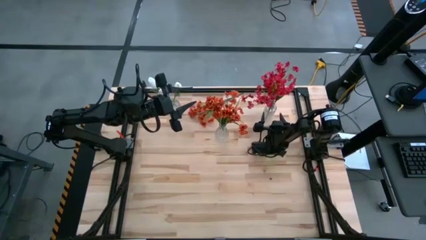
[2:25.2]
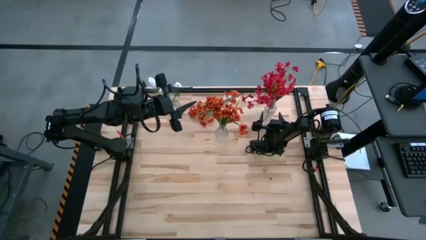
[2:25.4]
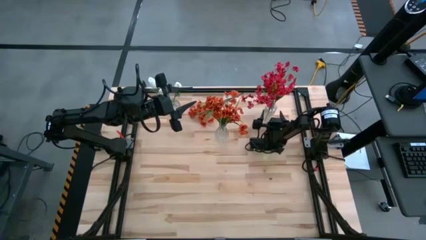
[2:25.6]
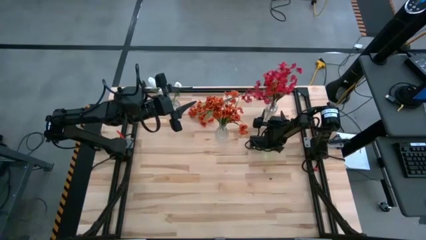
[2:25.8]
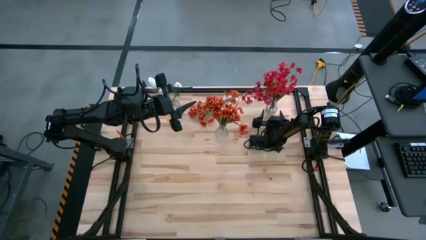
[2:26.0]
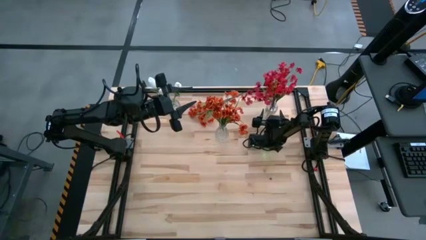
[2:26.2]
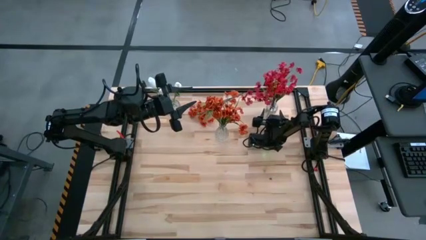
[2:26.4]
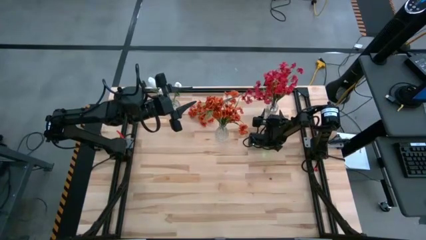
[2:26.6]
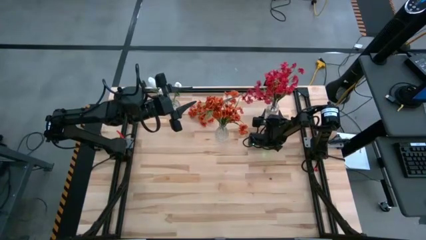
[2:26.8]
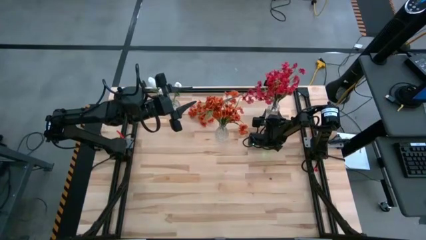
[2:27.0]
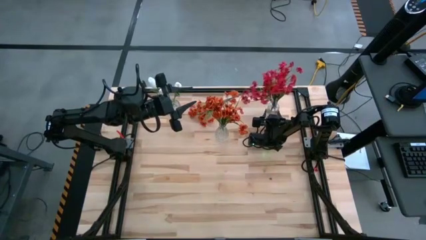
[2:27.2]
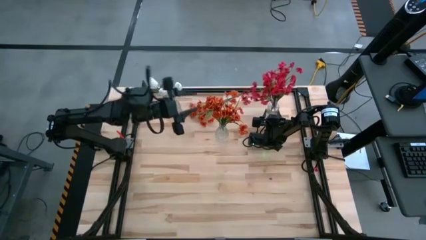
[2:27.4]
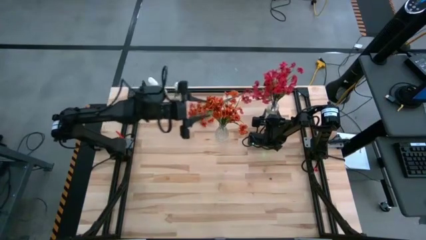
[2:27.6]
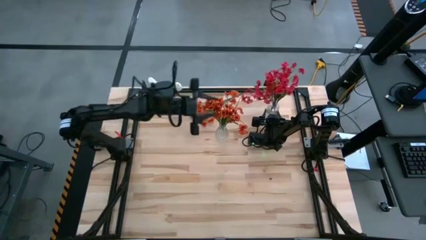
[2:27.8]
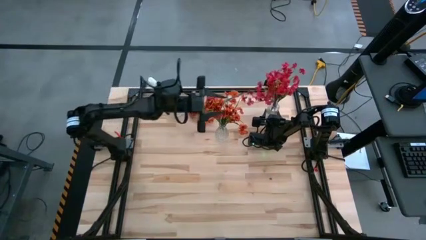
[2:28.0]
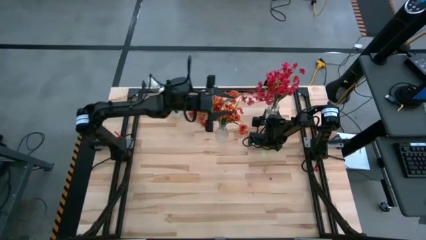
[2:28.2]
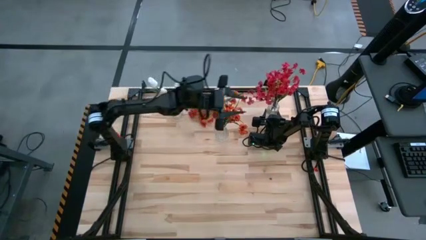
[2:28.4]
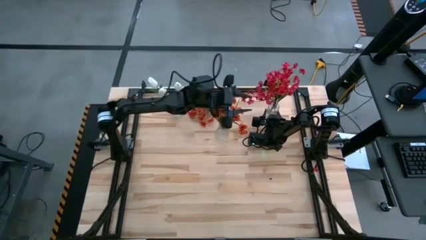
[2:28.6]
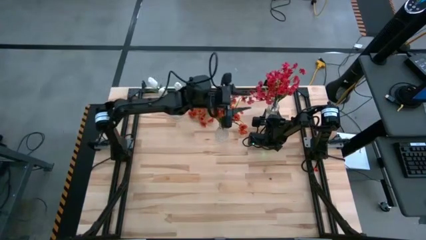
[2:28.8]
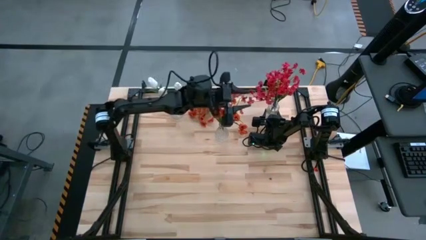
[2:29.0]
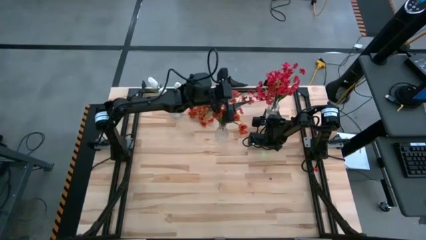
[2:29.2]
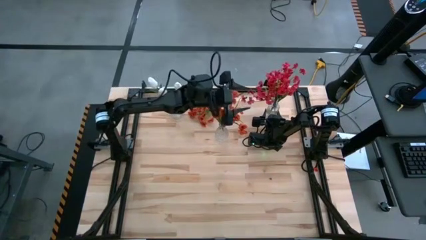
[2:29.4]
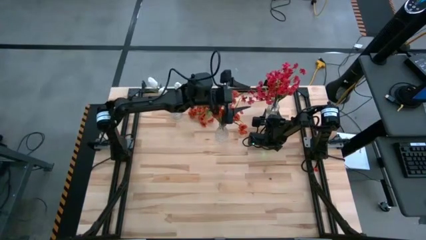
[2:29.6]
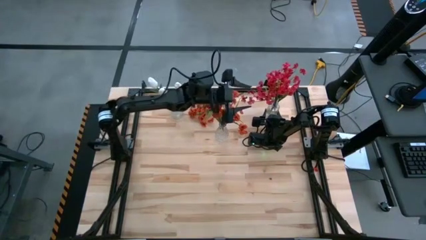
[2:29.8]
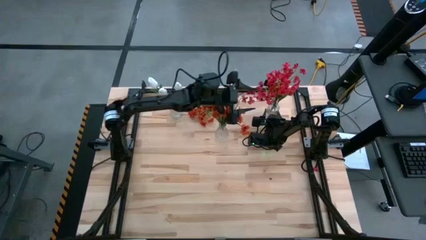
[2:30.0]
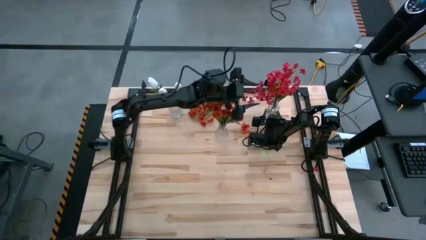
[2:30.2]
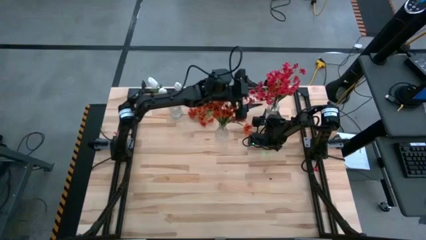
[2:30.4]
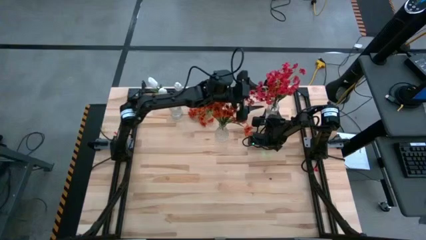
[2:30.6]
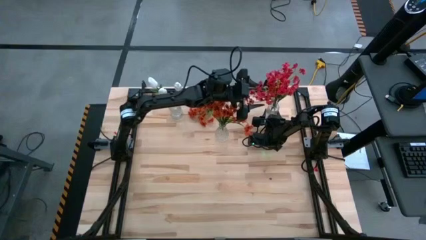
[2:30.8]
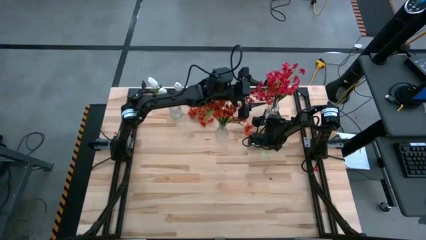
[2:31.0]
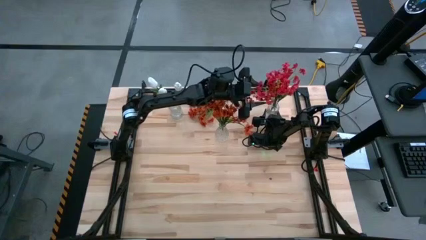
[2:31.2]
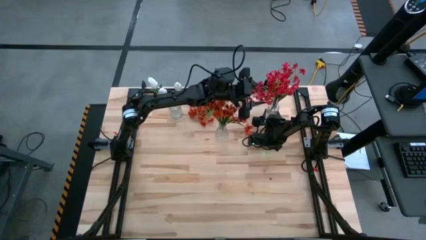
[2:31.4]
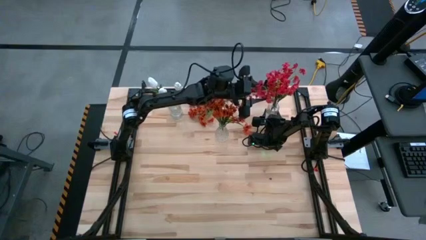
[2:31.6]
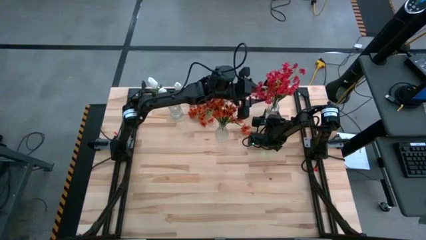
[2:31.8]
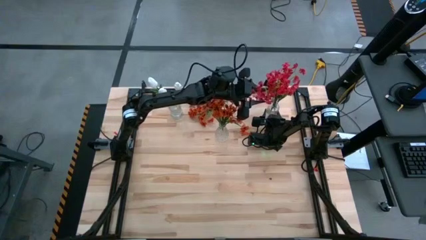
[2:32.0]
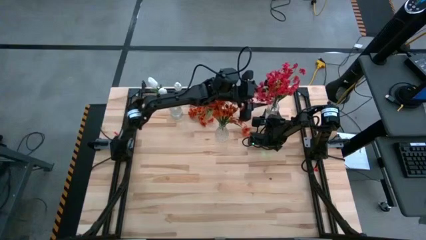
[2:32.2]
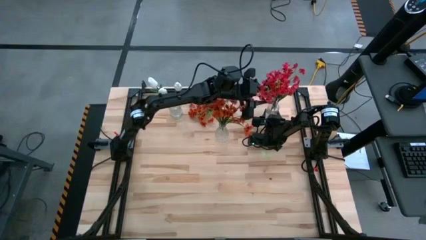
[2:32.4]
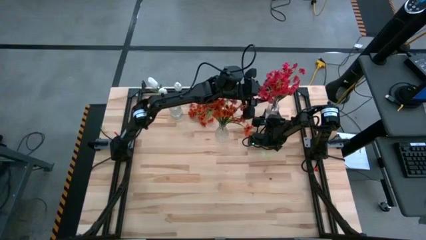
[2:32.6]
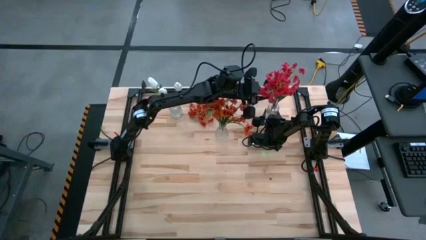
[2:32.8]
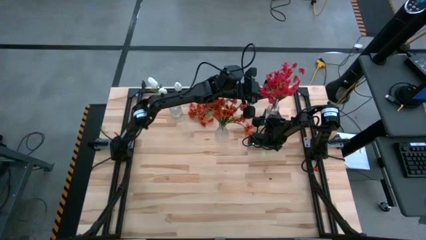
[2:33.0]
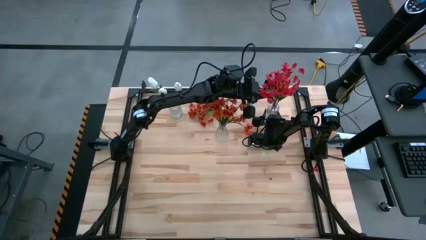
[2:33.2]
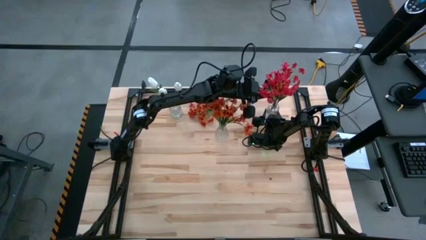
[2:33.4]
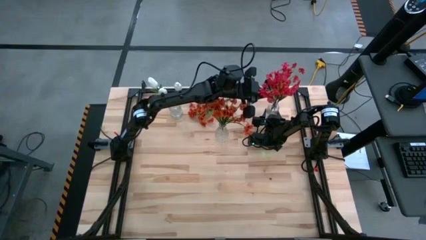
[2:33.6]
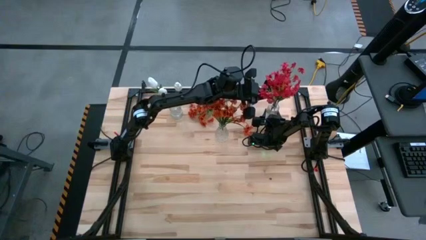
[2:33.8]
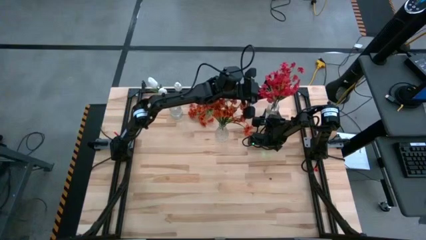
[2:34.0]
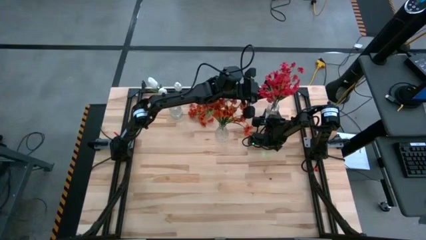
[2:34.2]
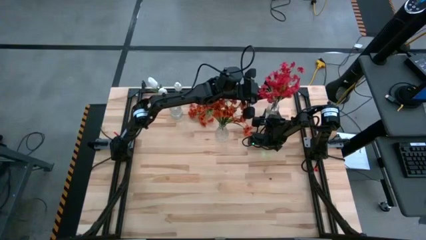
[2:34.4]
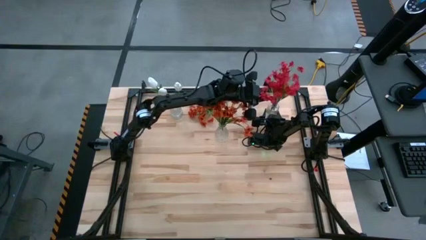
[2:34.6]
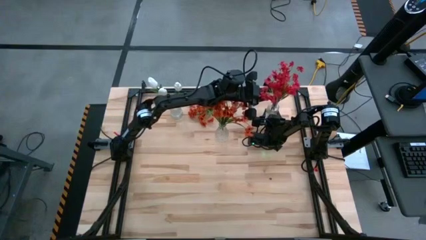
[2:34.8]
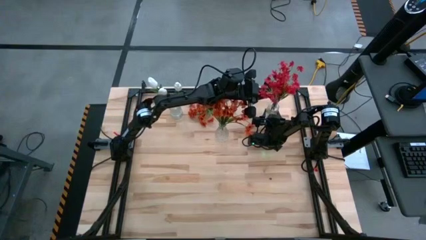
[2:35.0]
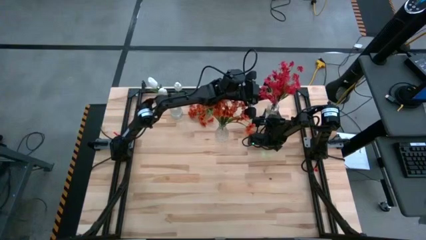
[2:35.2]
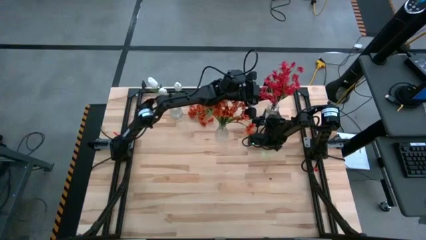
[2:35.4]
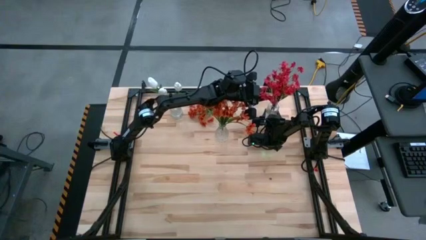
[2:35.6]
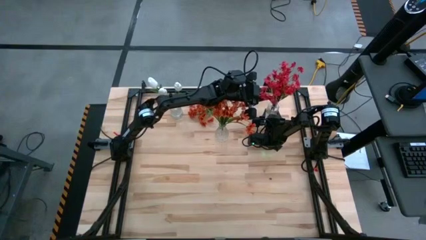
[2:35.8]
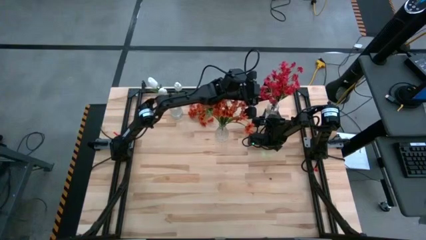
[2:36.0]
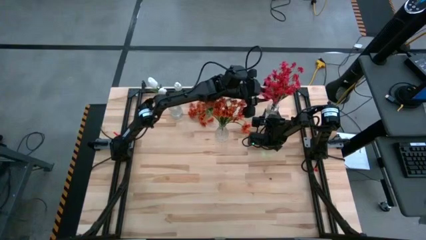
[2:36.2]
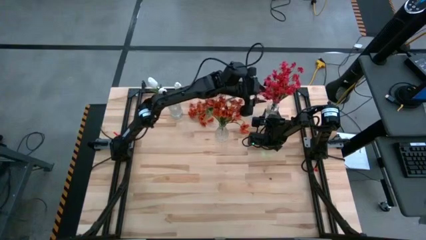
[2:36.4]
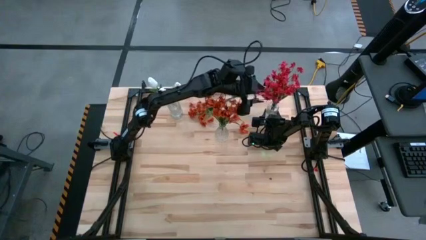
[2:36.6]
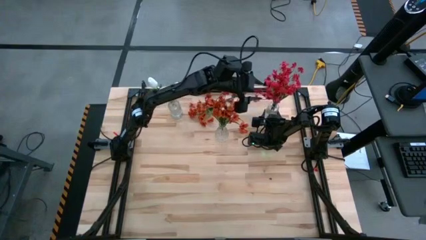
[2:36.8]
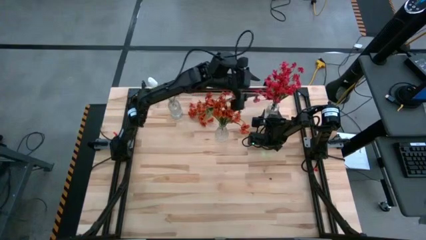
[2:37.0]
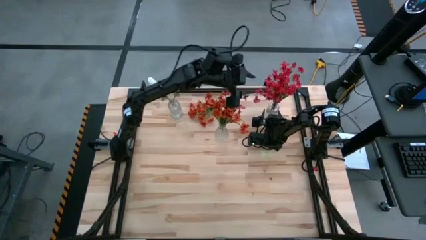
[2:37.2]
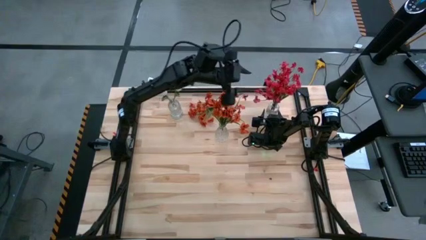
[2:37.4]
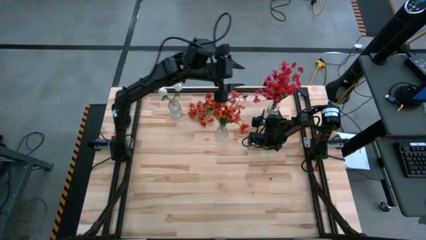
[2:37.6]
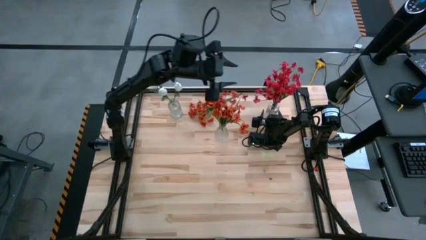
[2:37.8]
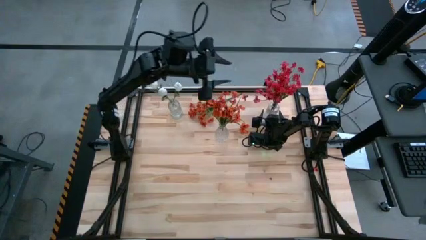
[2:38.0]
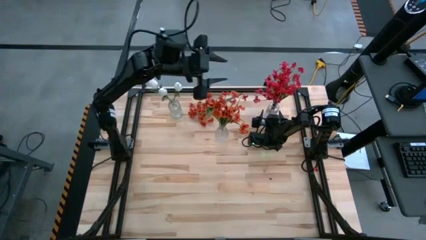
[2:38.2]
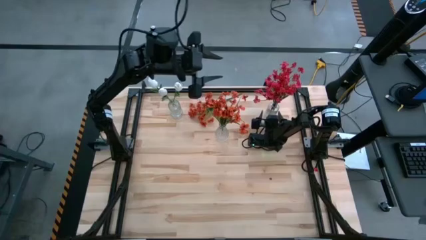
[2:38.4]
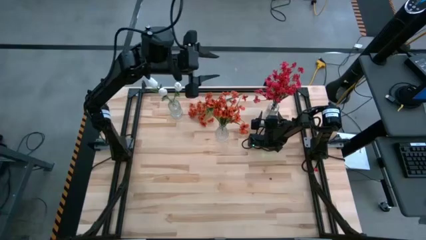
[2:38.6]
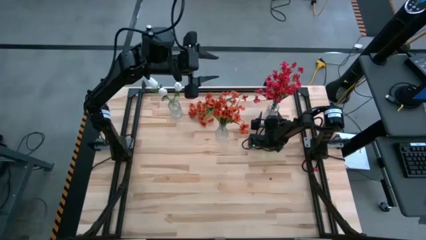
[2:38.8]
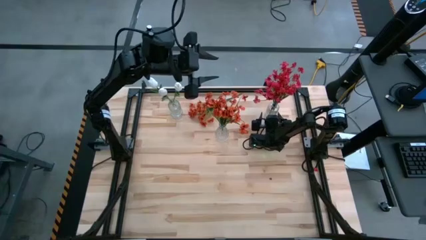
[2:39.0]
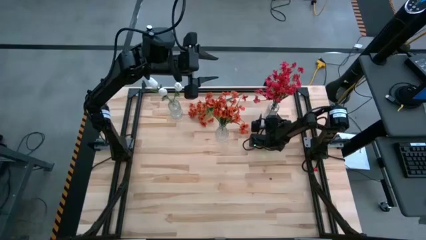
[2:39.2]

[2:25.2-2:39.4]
Task: Sort flowers into vase by color
Put the red flowers into the top right transparent vase

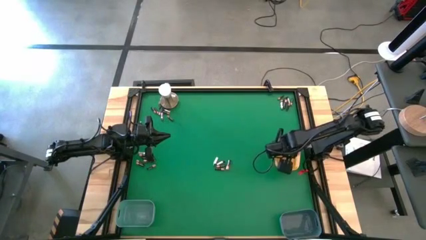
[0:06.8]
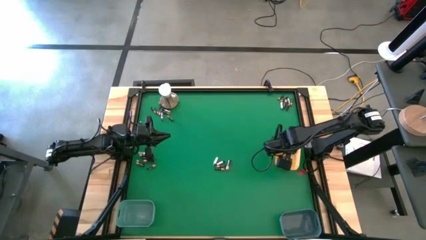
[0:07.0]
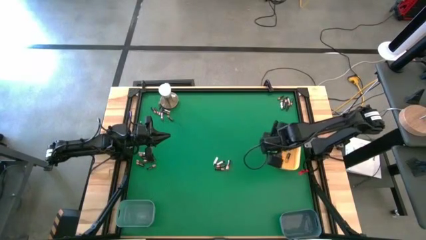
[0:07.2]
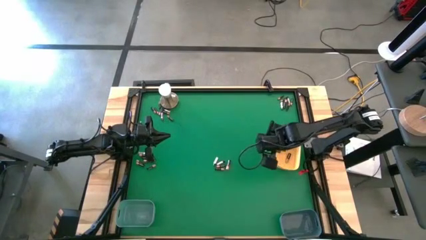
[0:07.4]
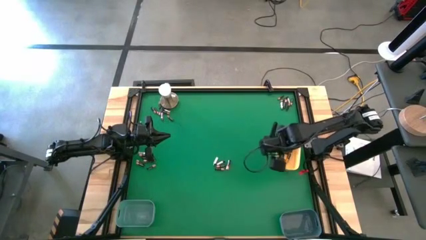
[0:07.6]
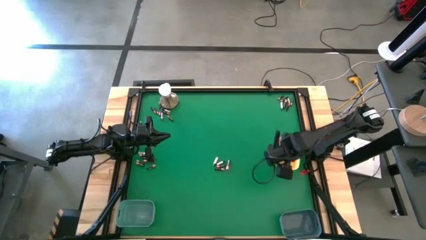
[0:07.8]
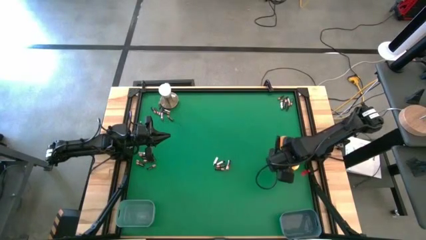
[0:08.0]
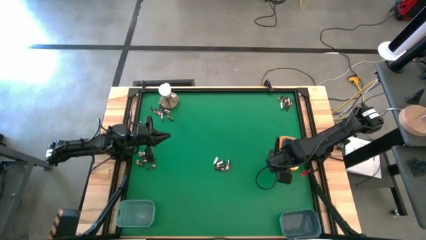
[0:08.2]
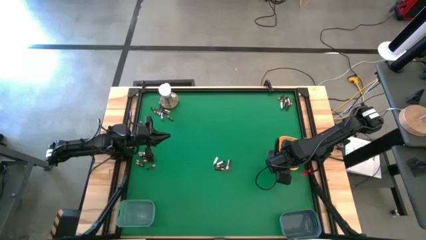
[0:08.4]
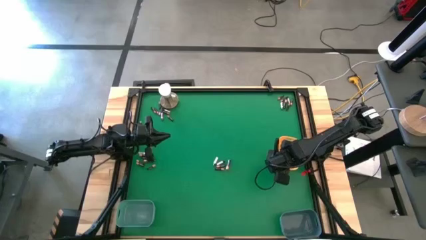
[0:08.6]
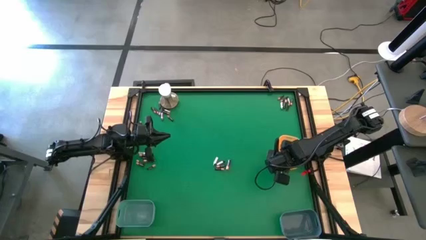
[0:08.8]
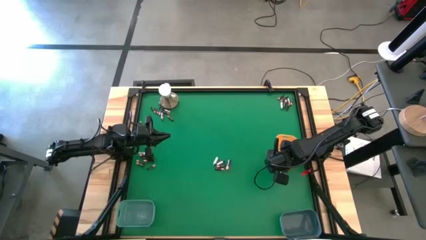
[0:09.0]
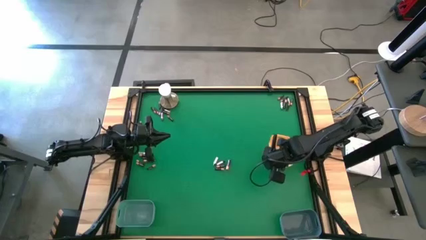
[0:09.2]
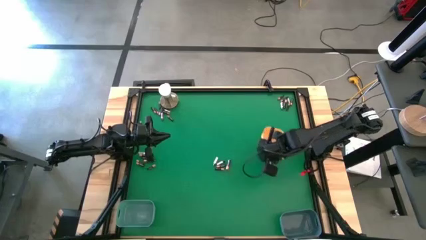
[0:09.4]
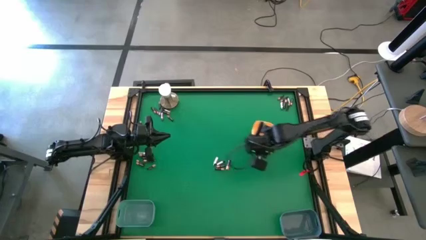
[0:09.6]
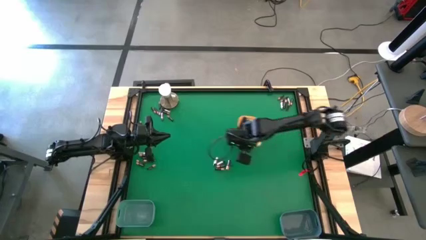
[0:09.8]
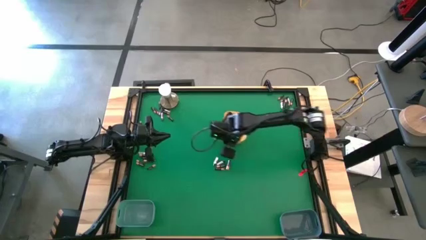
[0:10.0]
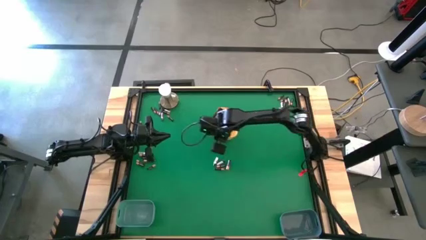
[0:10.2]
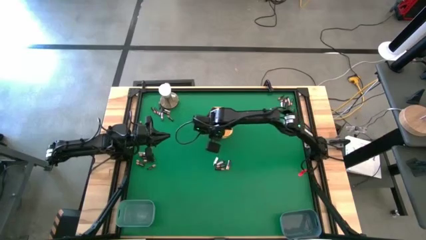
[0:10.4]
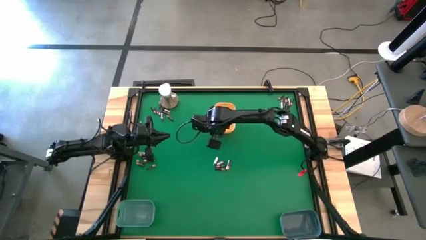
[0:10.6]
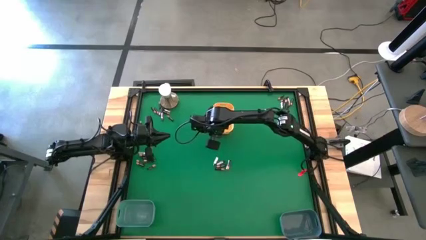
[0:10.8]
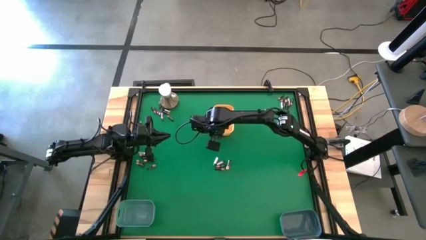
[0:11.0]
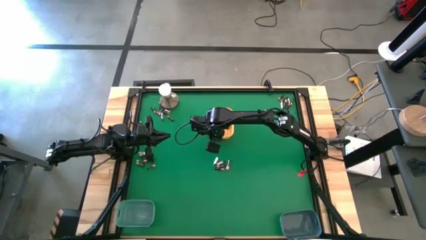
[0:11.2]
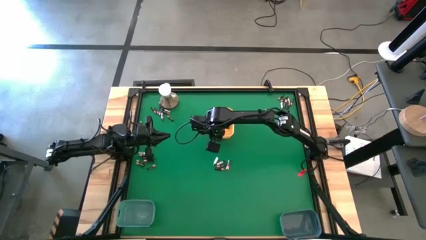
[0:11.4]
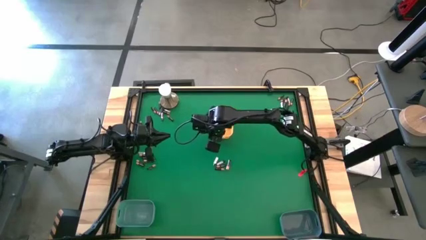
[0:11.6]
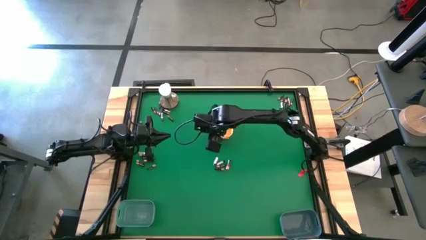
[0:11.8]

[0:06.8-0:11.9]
Task: Sort batteries
Move the yellow bin to the top of the table
